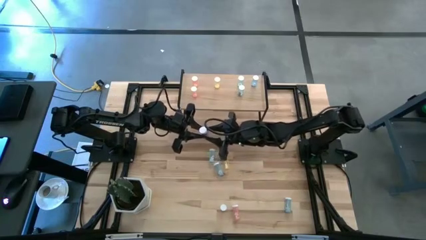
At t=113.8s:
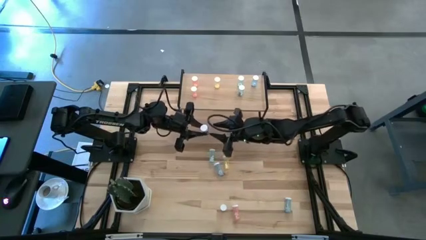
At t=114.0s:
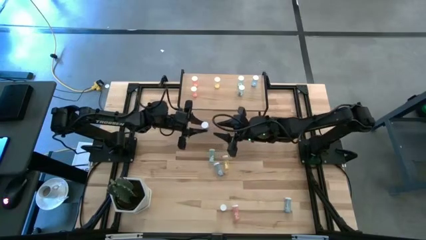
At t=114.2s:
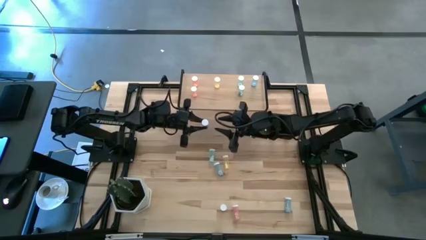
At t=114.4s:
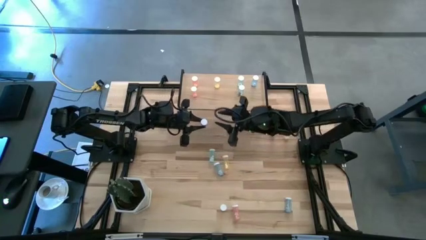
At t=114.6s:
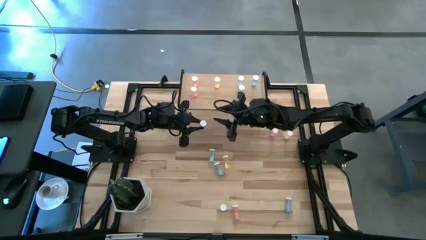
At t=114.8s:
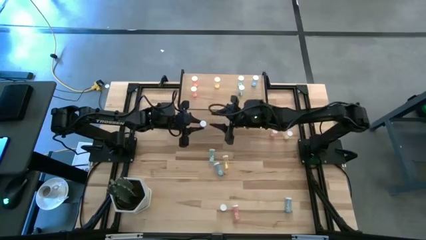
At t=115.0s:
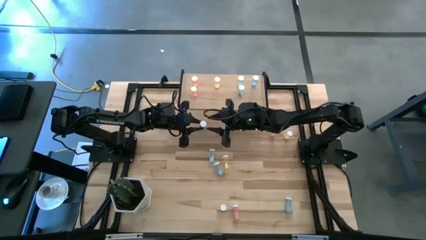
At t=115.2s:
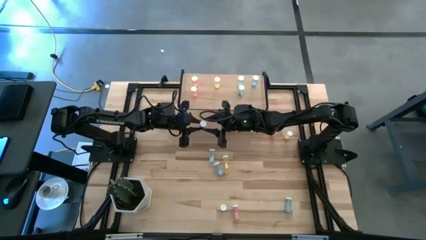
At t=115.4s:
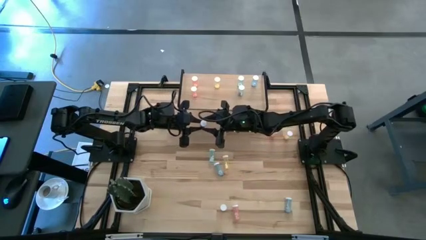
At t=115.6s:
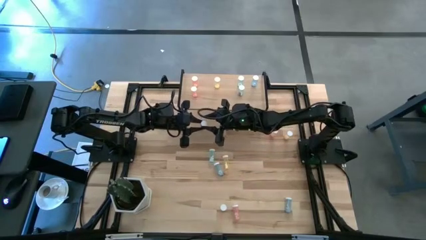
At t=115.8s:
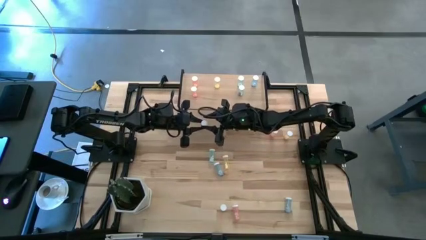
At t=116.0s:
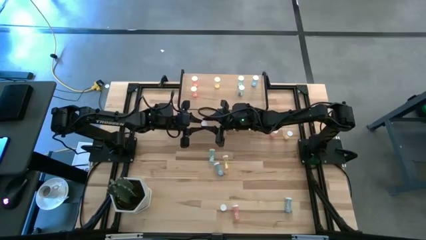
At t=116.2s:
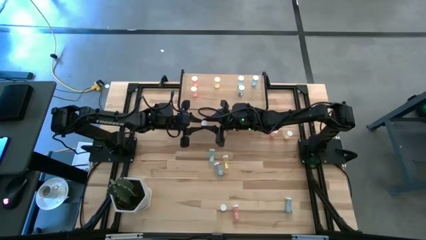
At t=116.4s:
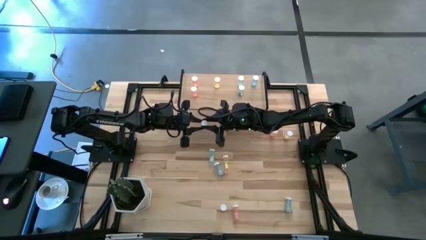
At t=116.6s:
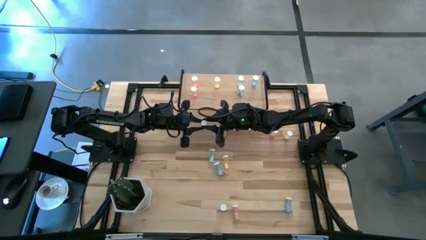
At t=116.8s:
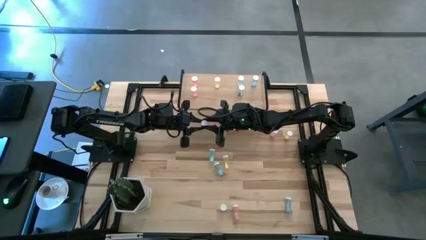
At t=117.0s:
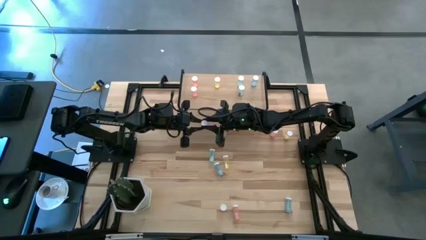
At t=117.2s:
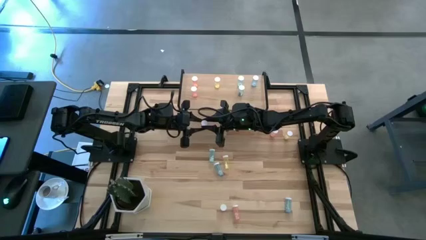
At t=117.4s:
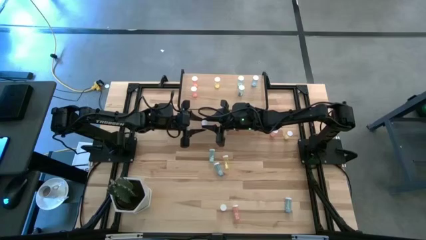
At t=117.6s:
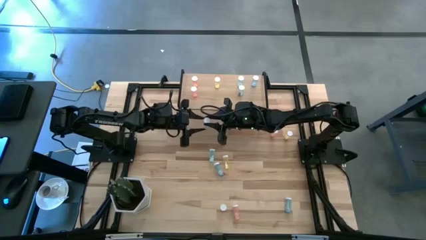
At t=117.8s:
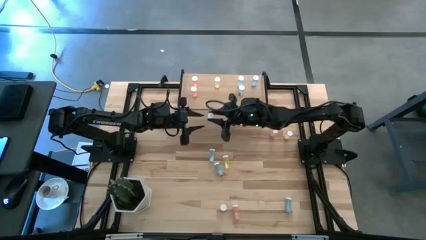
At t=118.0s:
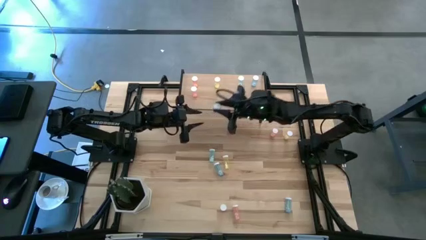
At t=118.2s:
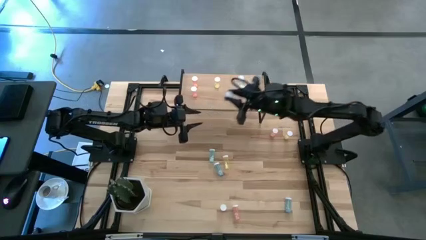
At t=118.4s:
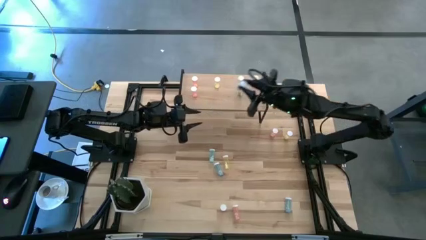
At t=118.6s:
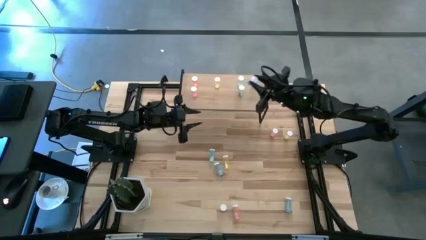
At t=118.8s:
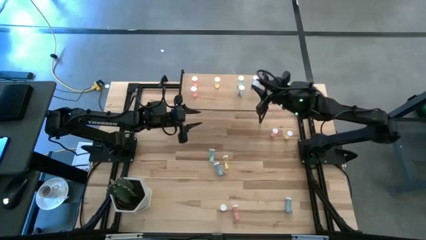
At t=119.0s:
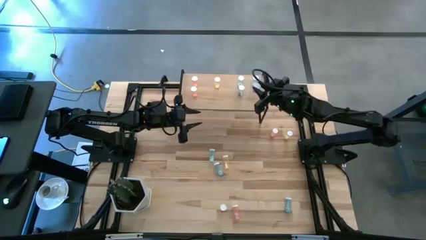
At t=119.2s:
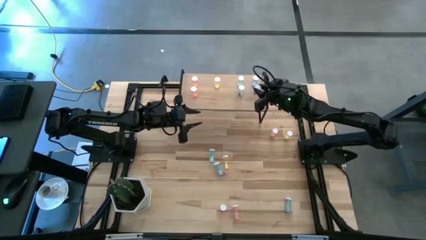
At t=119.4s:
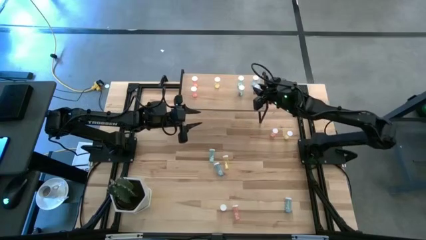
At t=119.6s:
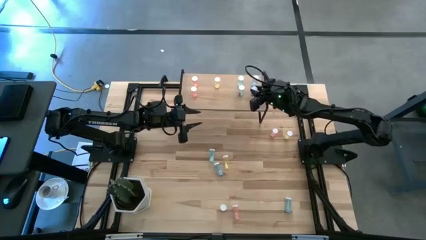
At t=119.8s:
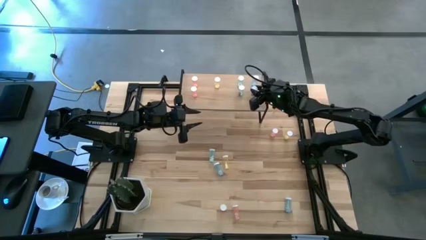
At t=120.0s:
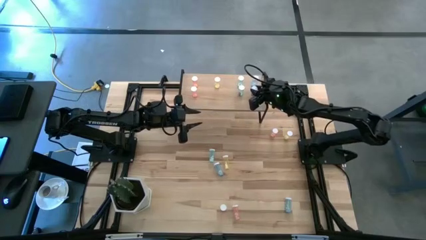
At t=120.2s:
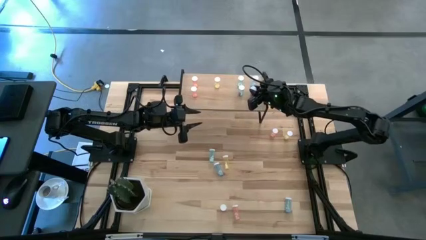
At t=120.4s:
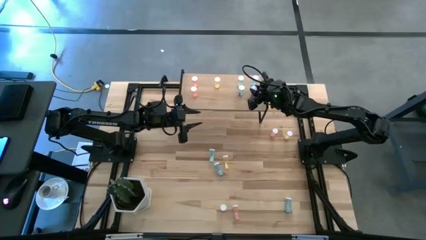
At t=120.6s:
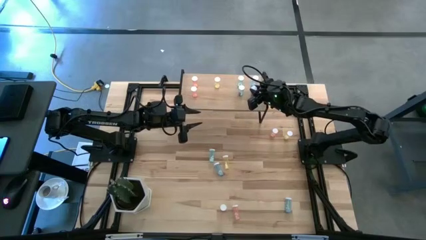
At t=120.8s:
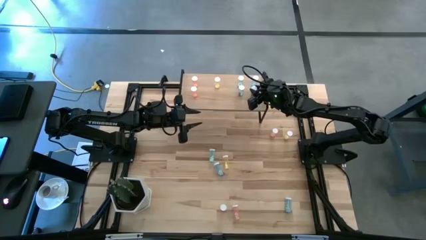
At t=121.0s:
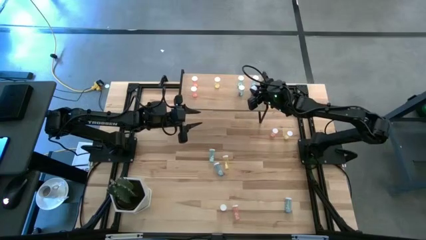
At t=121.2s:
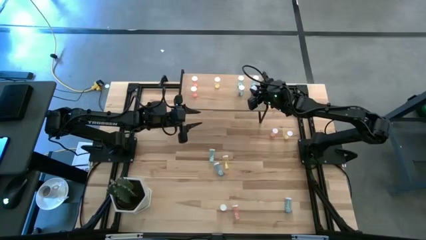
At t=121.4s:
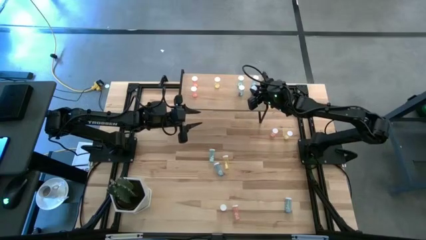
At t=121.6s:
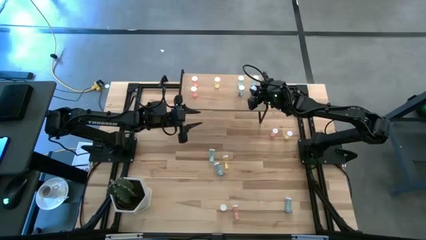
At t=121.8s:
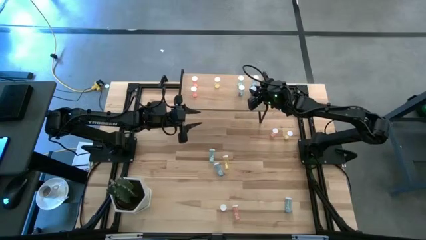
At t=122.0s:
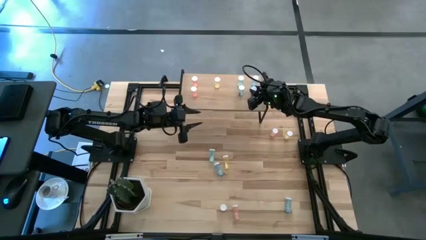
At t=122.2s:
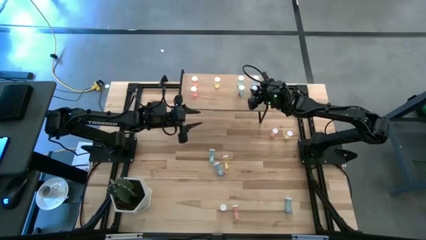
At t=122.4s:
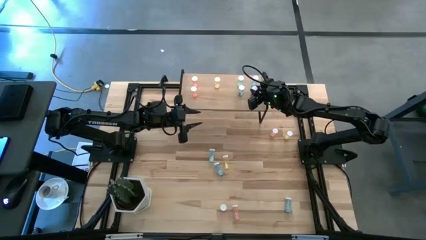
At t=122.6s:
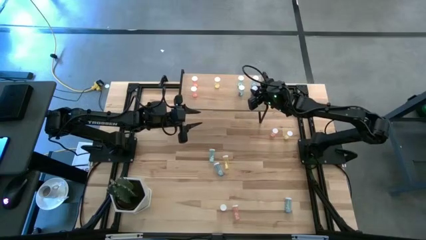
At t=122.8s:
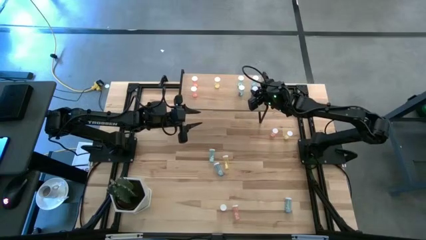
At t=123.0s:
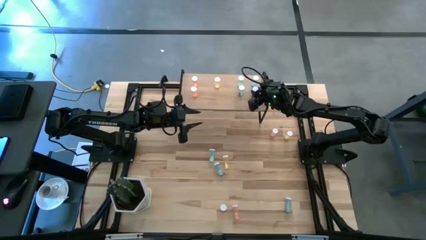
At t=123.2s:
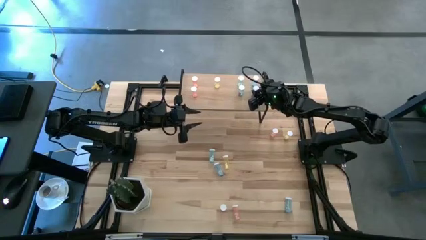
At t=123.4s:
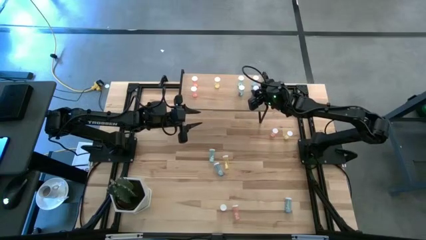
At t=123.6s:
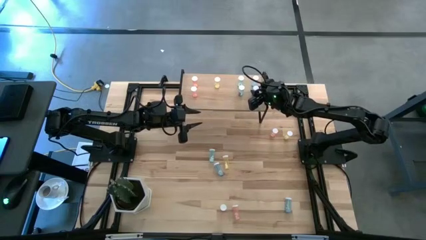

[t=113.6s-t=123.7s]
Task: Pick and place medicine bottles onto shelf by color
Put the blue pill bottle on the shelf aligned with the other blue pill bottle
